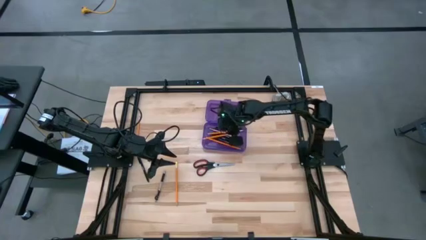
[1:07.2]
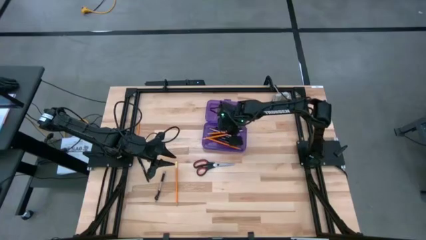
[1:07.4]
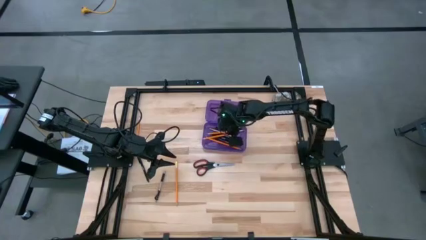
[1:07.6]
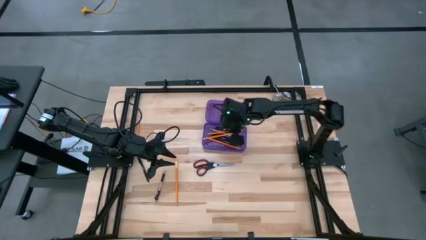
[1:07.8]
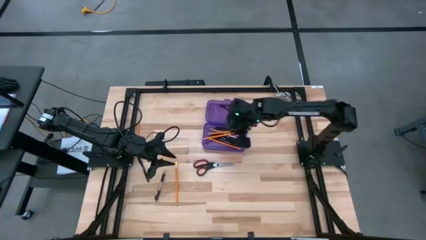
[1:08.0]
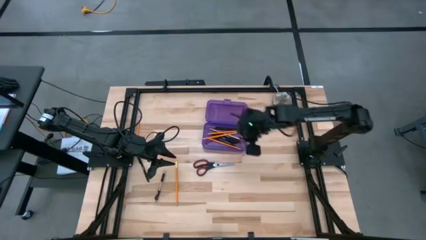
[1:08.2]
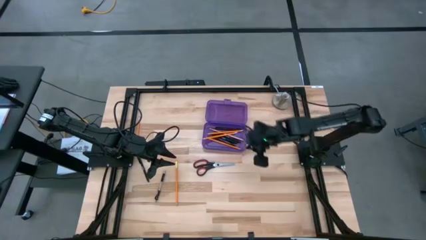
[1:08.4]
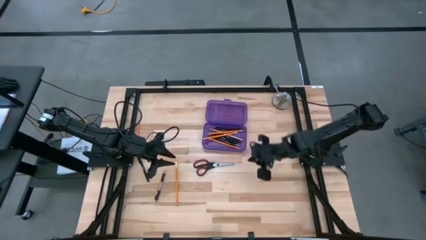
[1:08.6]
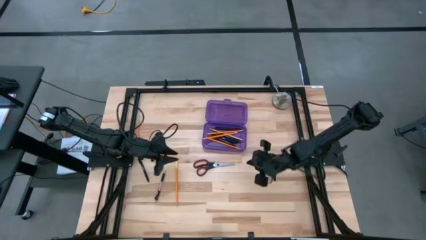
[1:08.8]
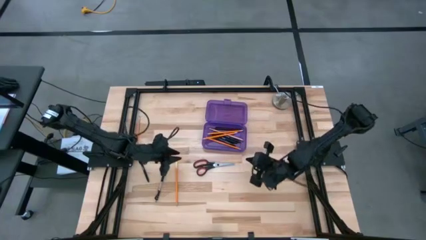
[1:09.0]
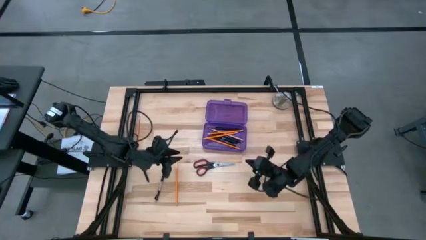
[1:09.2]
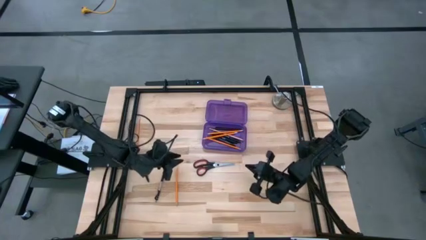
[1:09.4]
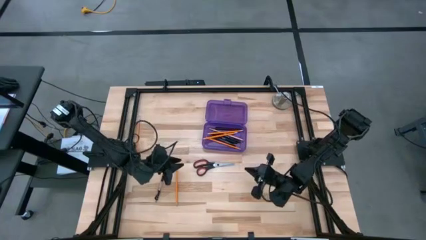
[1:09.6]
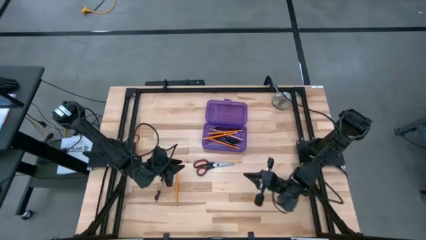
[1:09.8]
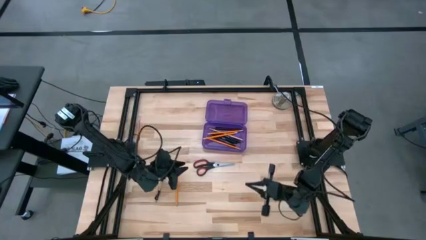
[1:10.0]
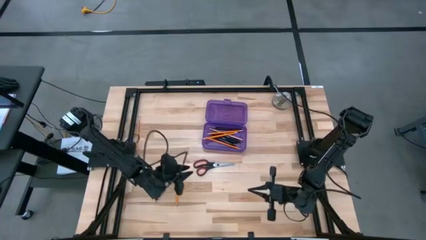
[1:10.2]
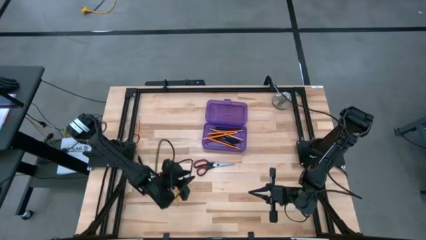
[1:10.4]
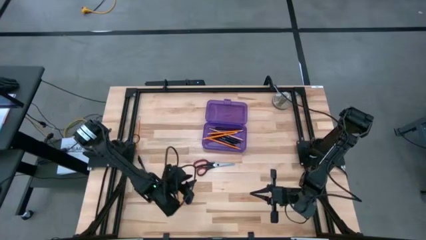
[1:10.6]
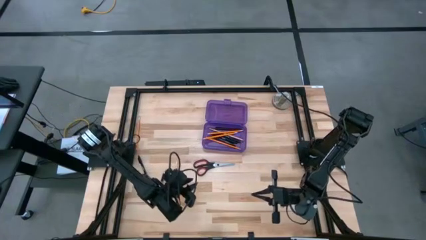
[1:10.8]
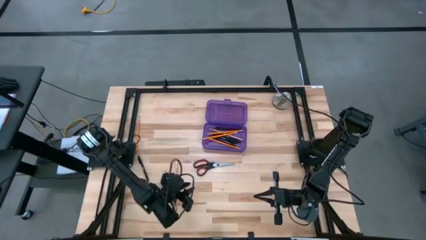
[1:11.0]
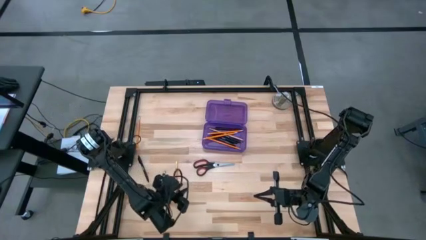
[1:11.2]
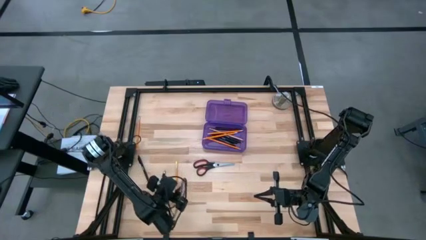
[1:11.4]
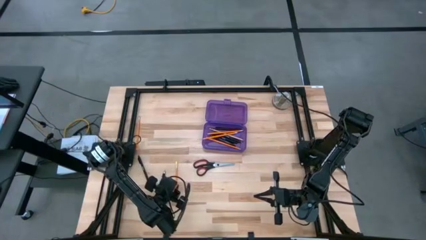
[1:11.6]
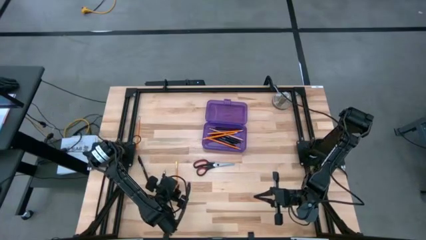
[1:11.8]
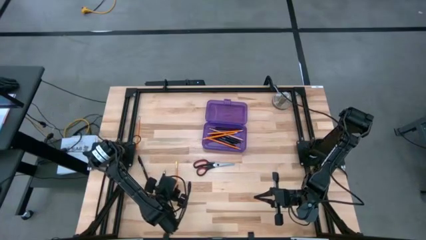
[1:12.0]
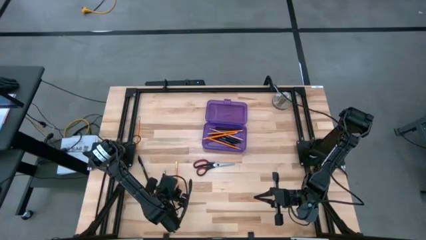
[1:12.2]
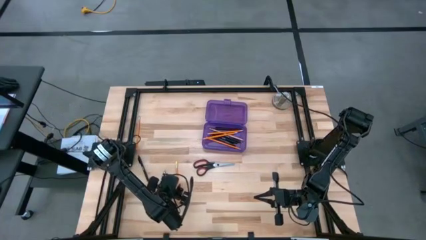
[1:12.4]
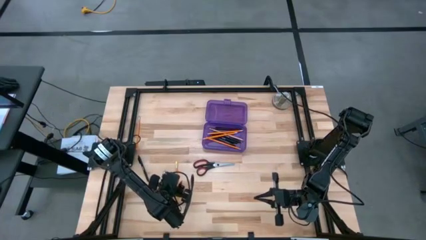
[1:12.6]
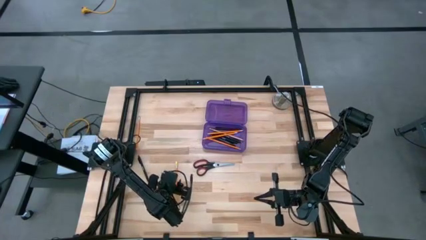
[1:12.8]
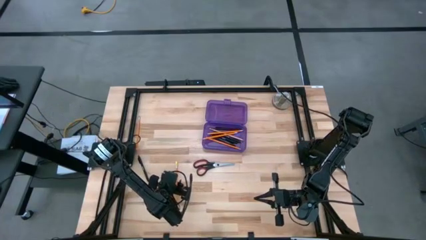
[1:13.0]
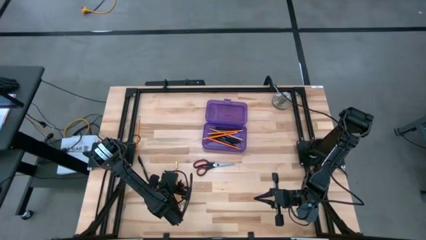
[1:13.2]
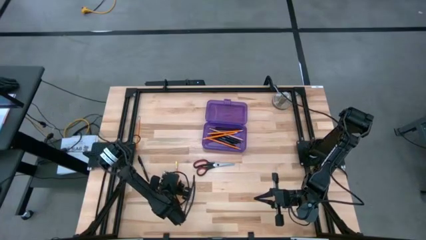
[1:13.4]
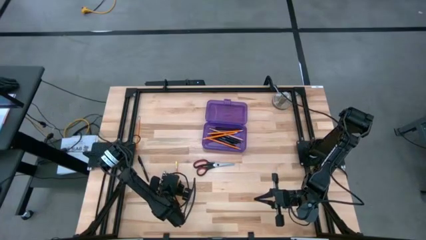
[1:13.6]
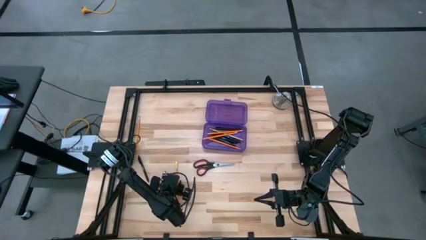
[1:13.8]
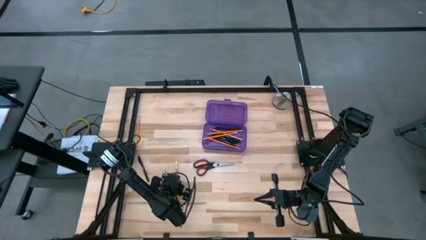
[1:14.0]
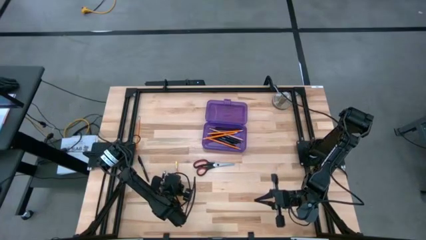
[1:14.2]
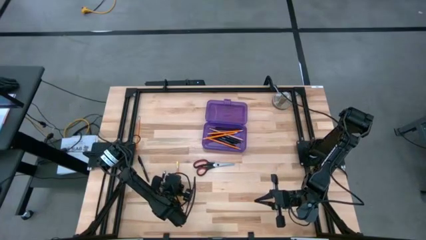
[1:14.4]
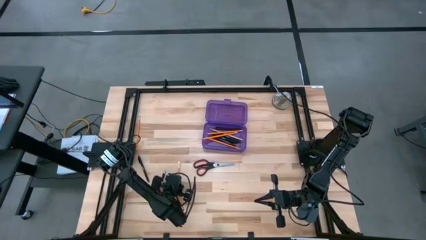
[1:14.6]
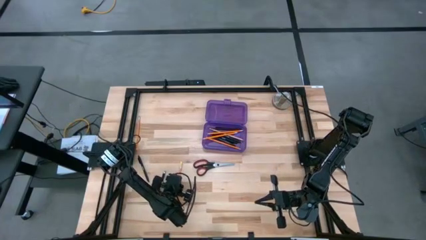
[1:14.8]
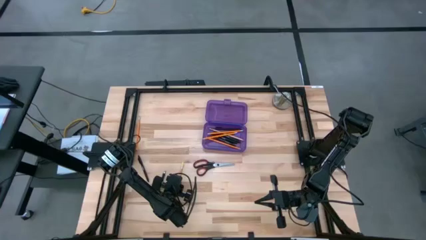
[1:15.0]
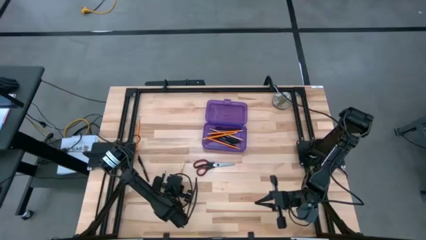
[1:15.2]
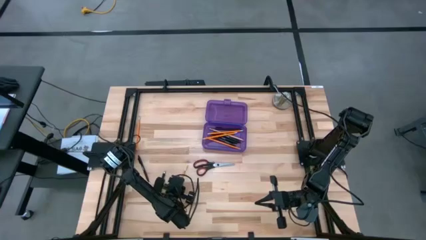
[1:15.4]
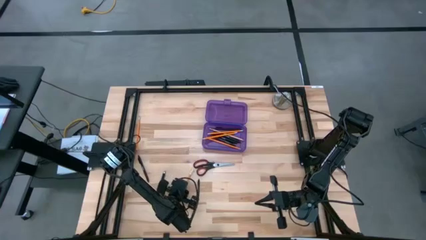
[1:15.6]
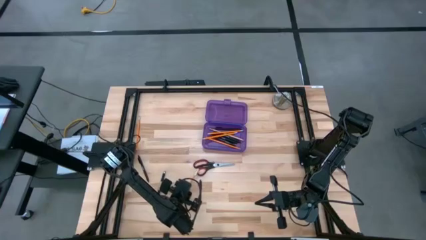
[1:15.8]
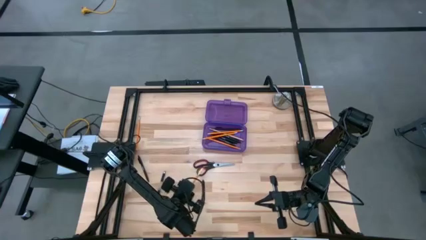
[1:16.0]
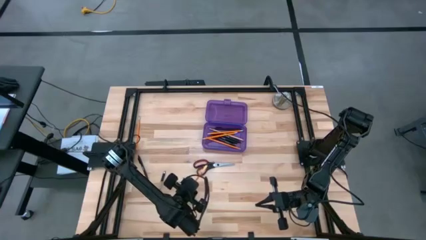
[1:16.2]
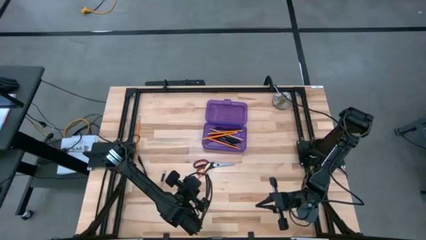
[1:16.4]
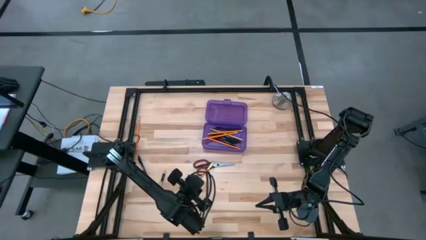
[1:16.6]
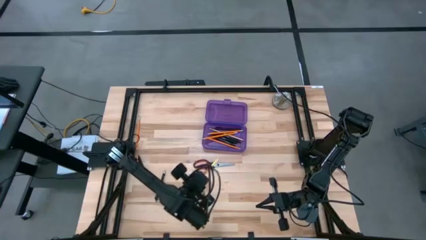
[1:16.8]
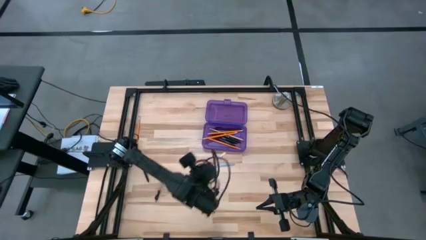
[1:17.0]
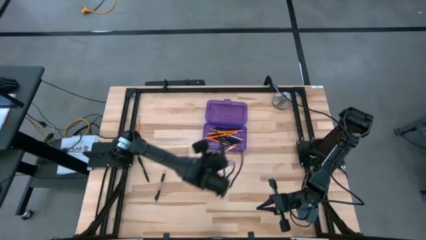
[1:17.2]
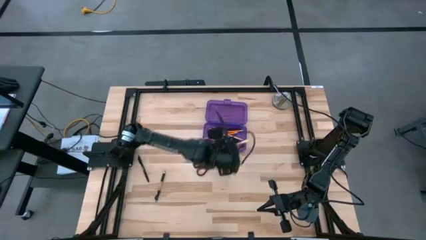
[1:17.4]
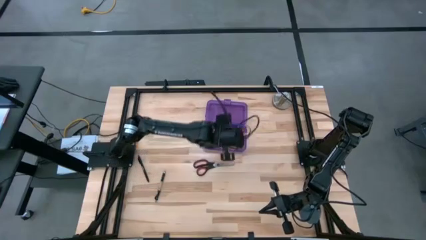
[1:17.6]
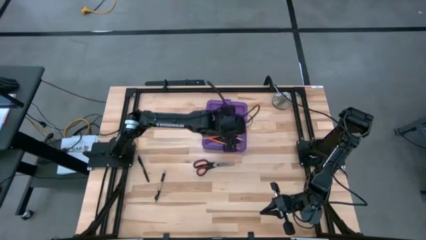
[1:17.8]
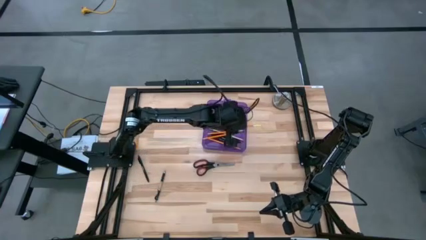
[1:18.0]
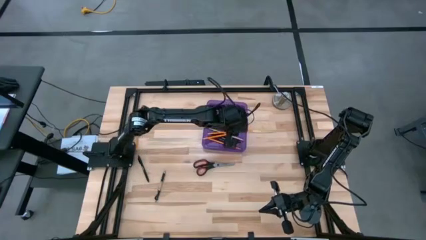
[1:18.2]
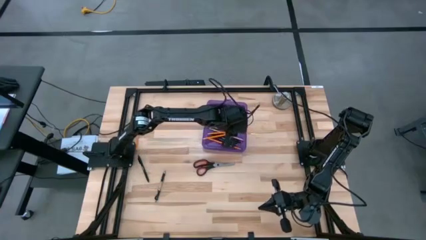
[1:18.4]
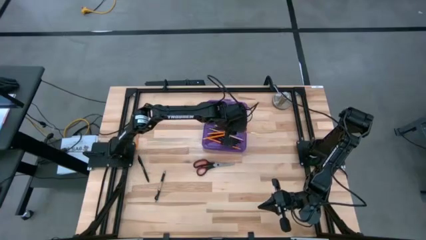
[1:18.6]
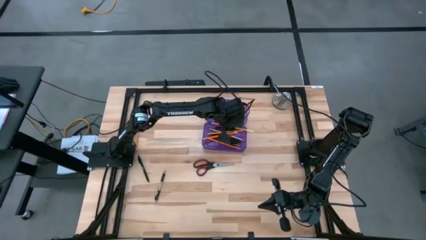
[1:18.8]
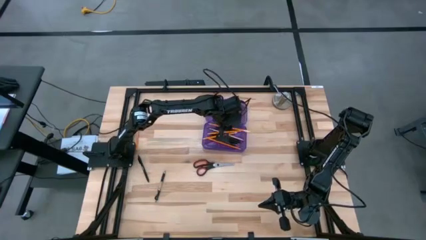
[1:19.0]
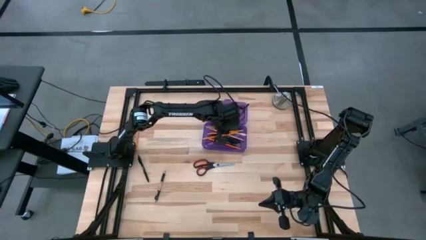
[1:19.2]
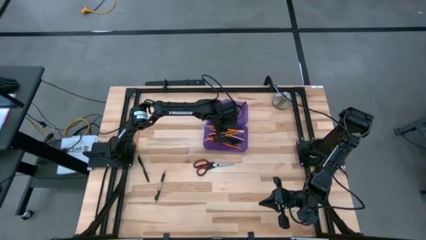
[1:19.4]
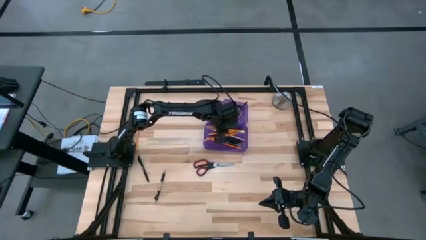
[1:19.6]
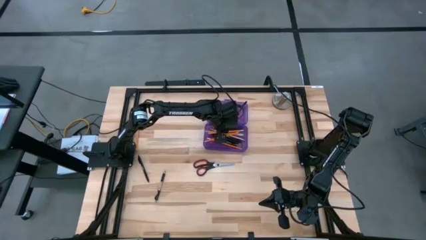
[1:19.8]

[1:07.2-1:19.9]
Task: Pick & place school supplies into a supply box
Put the bottom orange pencil into the pencil box
